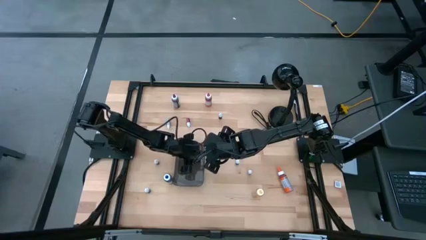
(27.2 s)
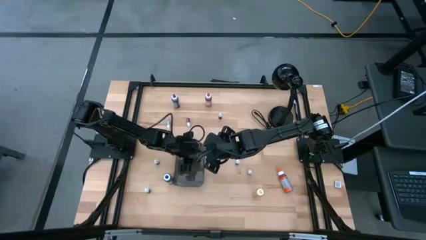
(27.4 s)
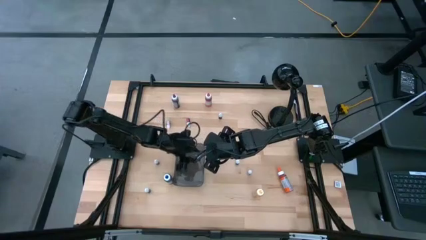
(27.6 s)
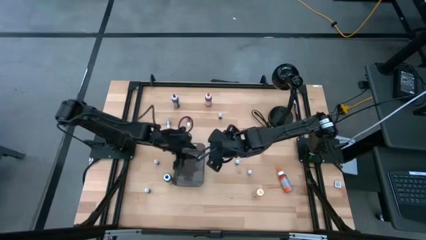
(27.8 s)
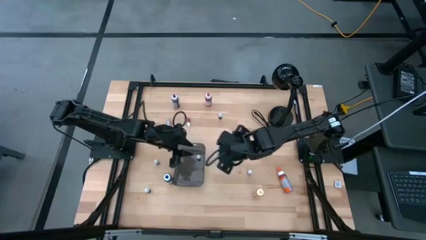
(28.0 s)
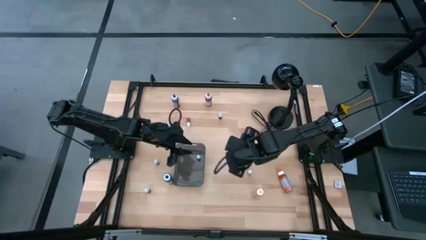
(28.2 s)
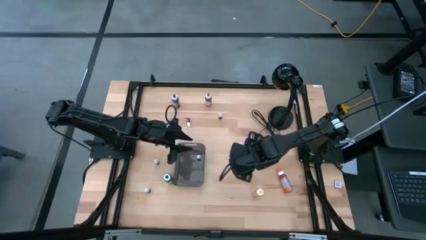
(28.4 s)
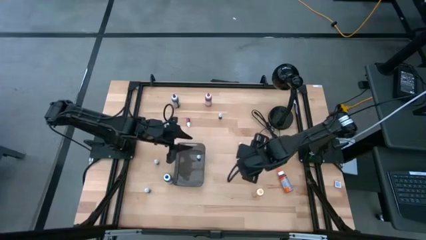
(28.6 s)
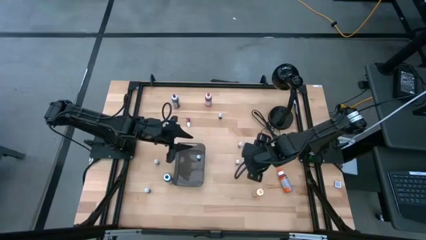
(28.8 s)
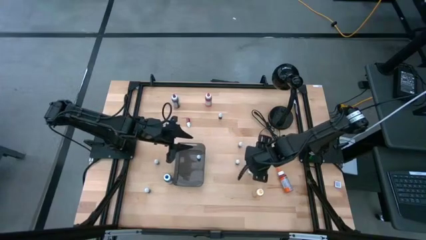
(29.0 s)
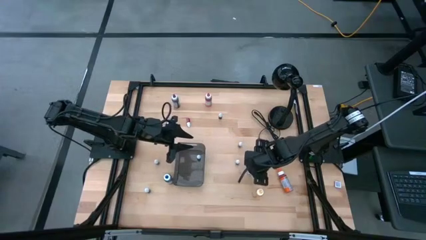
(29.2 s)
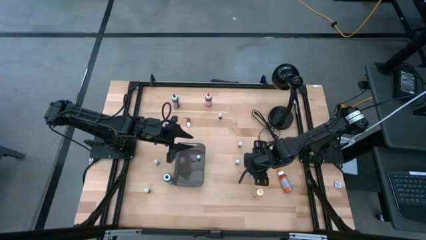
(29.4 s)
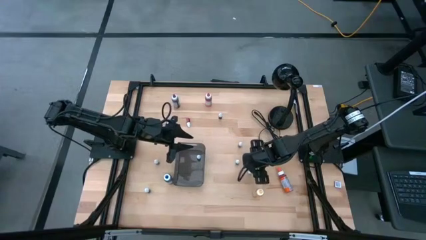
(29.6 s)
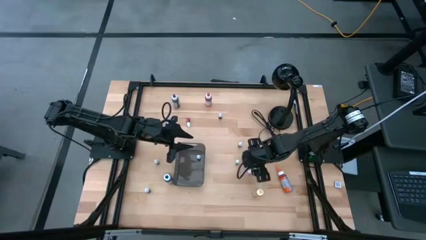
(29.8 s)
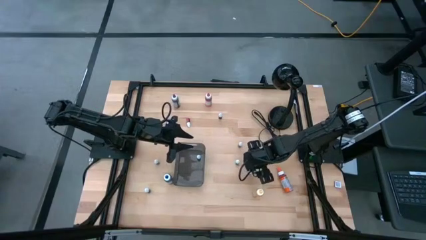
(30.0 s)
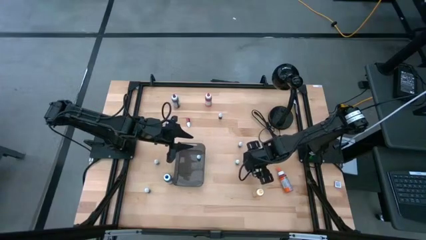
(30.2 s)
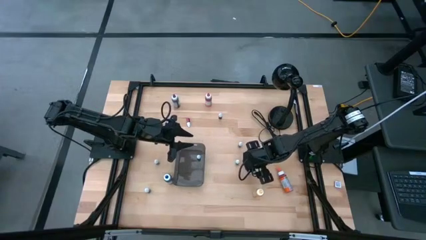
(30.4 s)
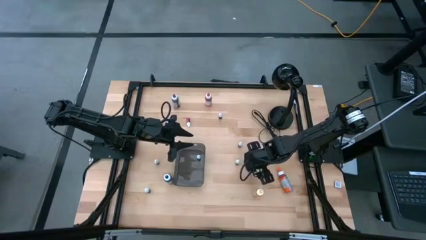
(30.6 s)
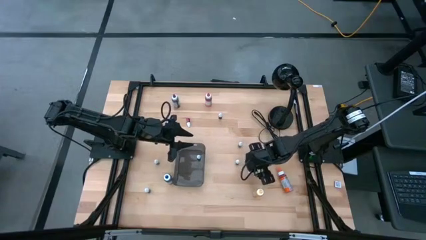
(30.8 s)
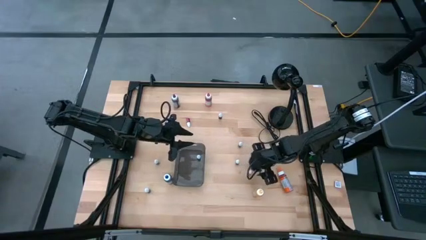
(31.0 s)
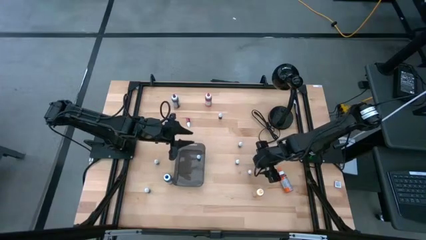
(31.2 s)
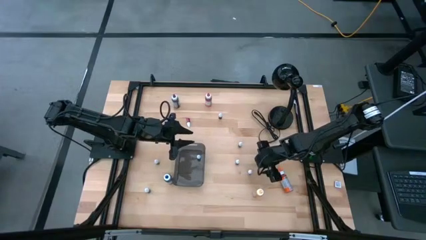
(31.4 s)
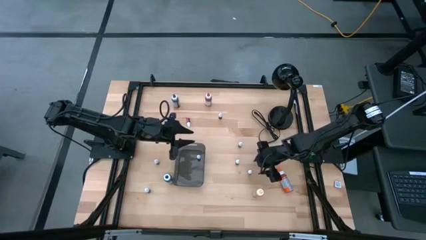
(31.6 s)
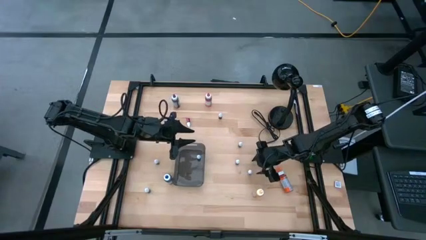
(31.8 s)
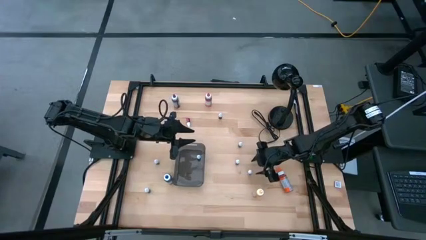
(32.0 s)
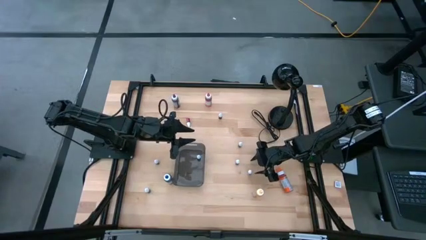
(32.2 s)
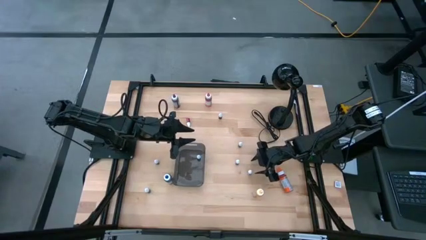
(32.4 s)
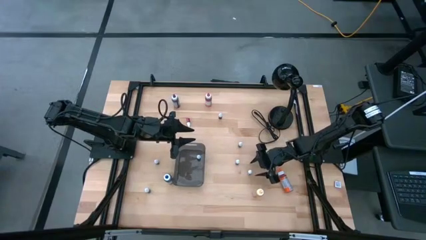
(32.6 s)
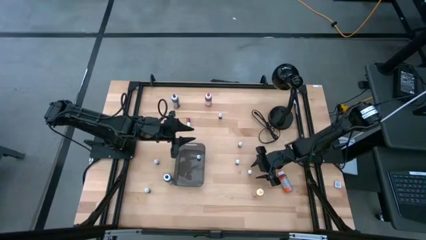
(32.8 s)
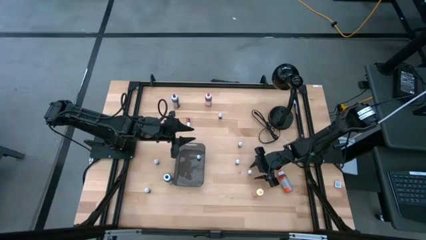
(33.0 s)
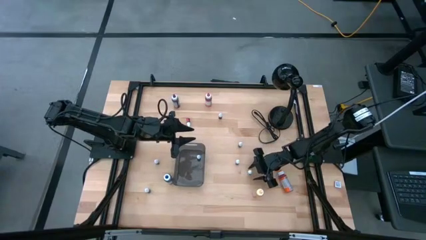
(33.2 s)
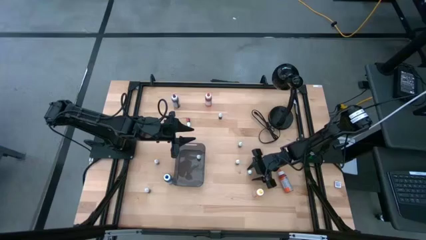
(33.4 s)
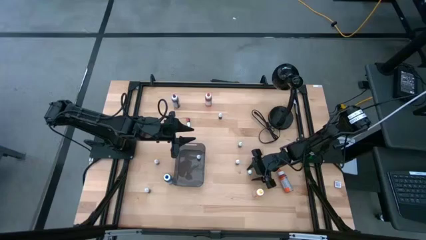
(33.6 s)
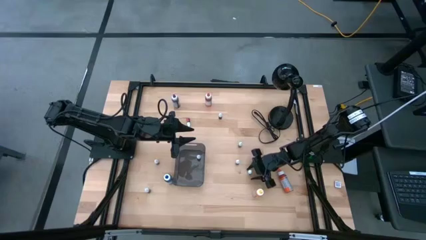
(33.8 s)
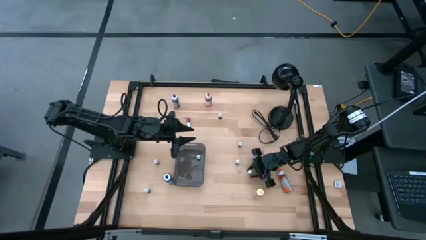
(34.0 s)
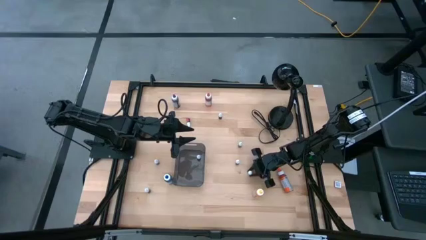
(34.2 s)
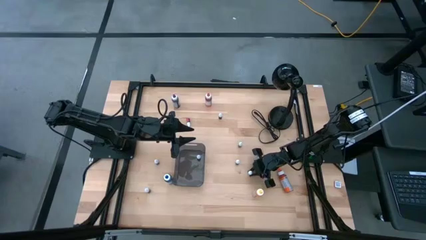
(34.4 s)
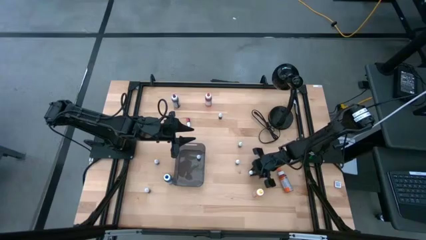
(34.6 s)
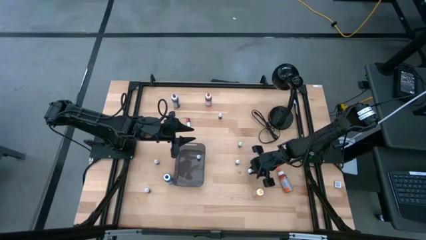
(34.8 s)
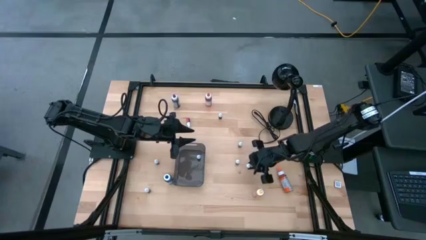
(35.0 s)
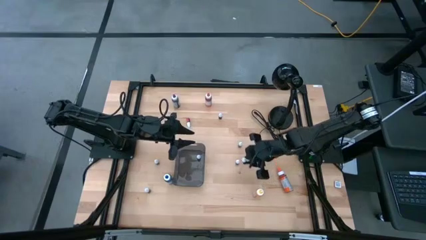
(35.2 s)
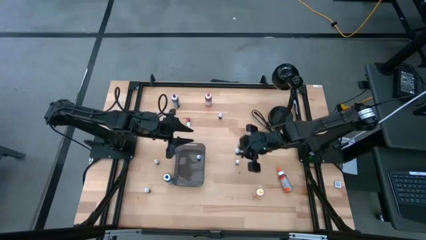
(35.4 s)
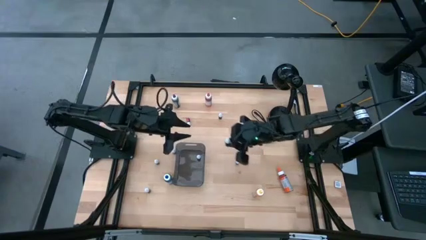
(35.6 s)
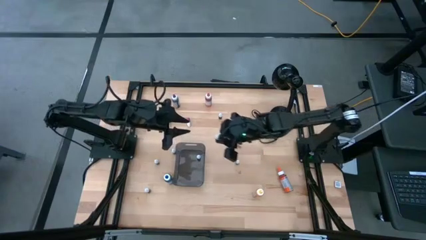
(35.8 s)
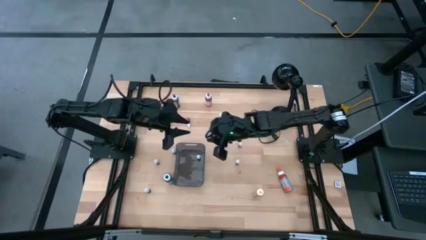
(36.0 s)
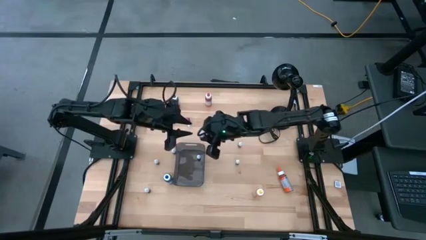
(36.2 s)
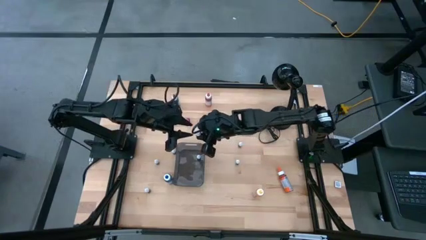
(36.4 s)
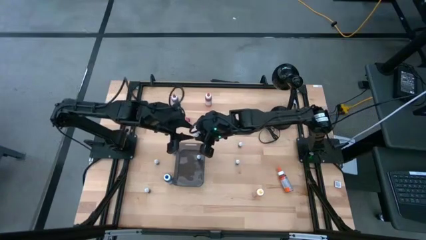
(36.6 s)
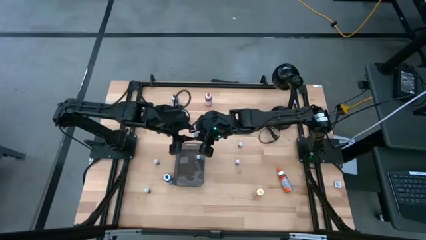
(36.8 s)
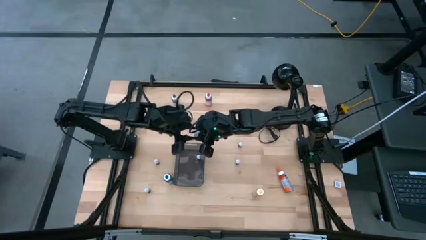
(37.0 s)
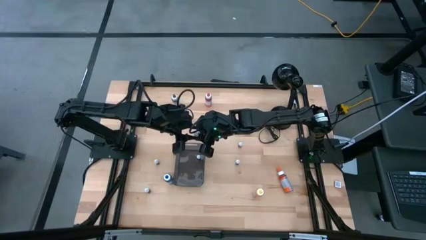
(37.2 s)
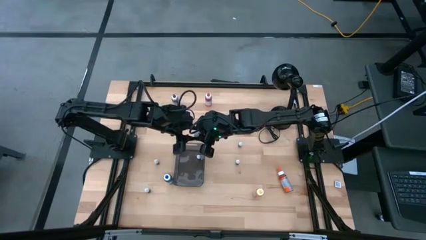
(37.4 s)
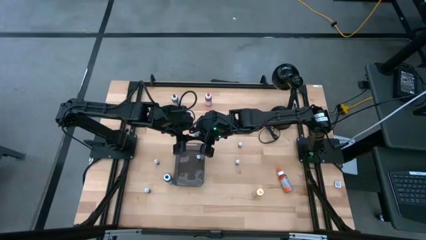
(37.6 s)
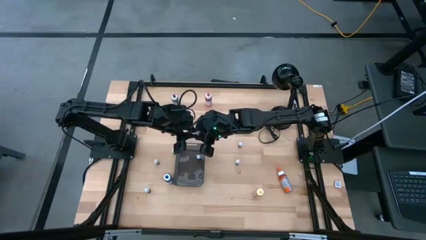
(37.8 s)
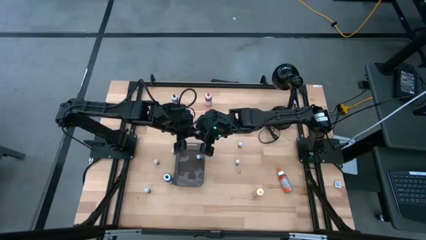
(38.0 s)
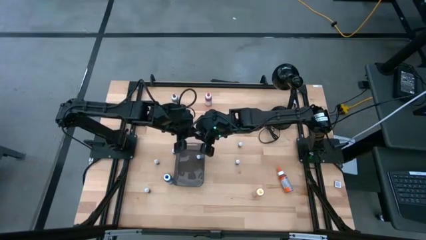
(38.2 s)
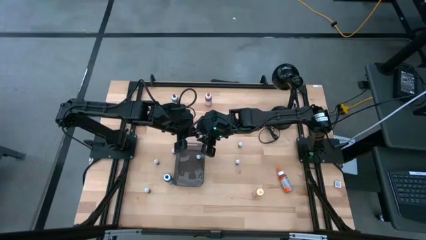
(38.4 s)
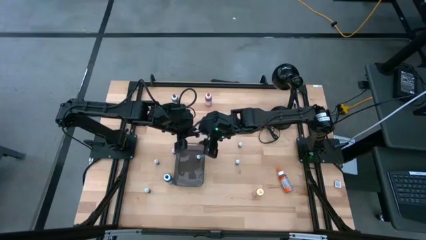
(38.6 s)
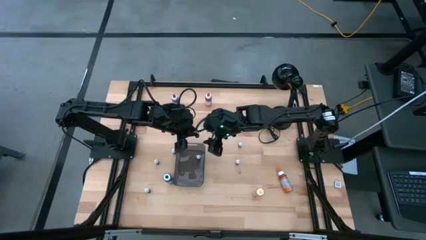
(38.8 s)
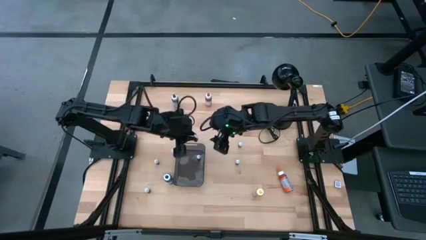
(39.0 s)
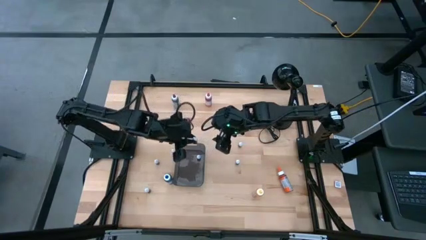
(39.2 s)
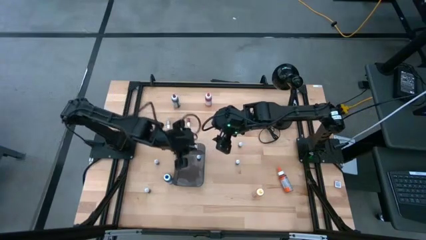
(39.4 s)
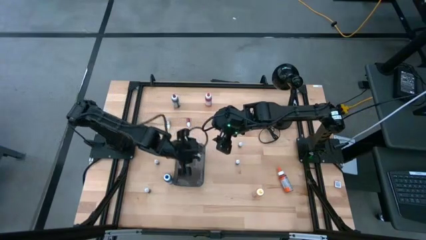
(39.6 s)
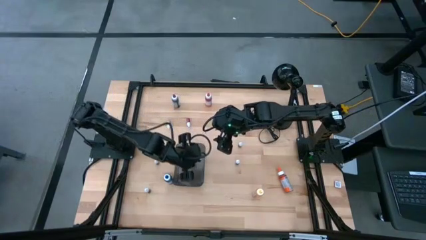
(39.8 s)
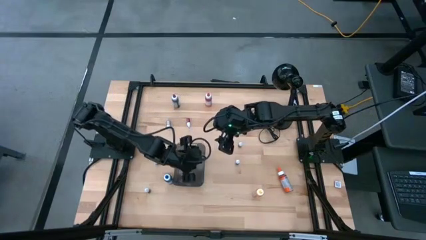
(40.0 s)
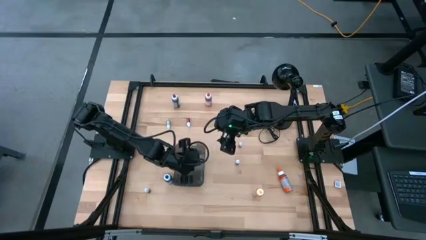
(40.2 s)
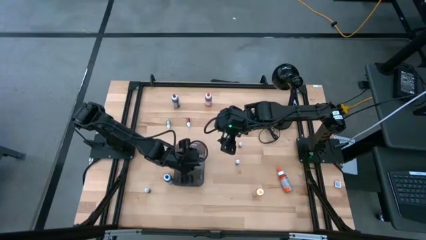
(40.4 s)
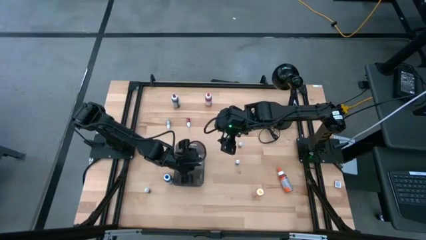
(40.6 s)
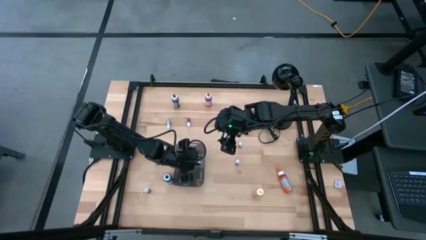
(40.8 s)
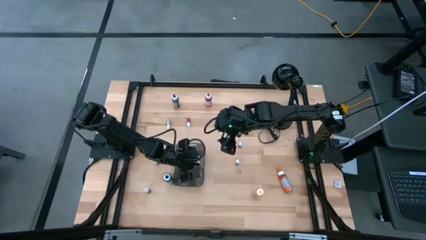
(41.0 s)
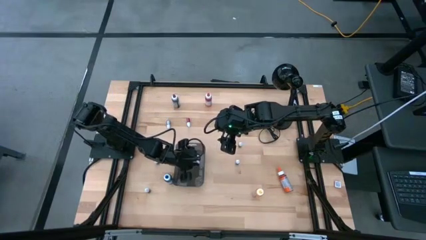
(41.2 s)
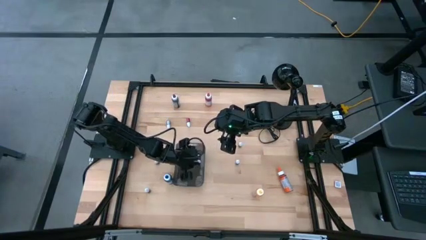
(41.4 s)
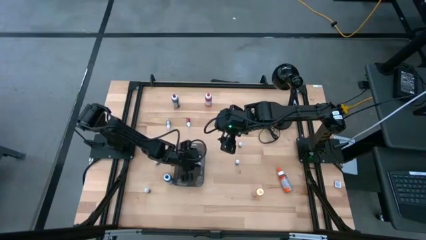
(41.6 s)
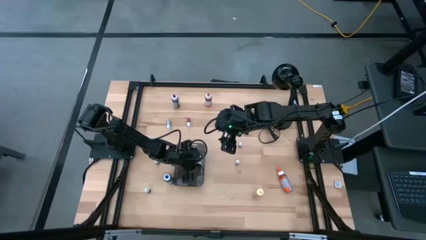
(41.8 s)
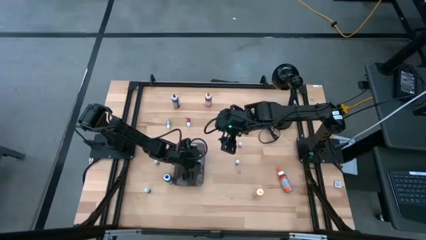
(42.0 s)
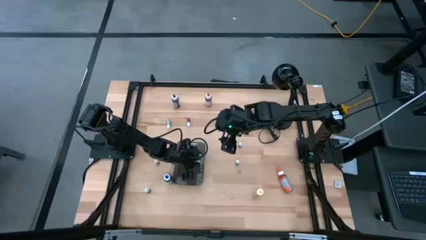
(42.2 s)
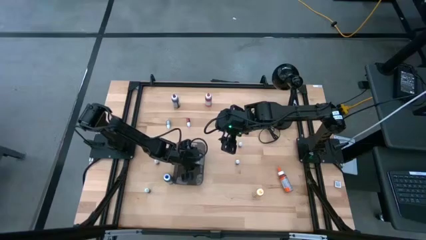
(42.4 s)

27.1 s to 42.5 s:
Task: Pick & Place food coloring
Put the bottom red food coloring bottle into the bin
